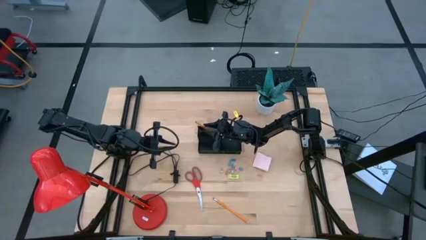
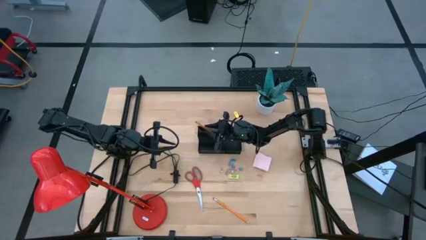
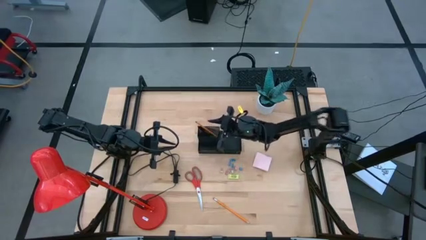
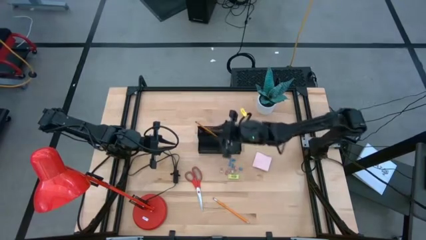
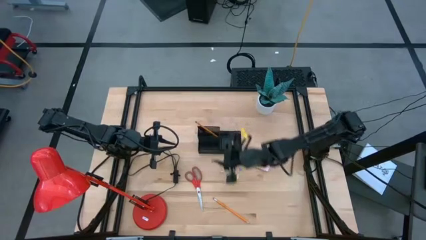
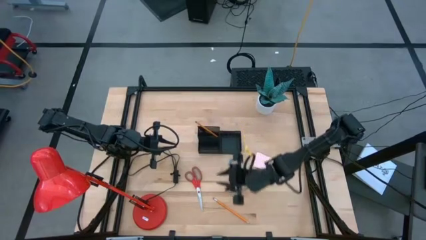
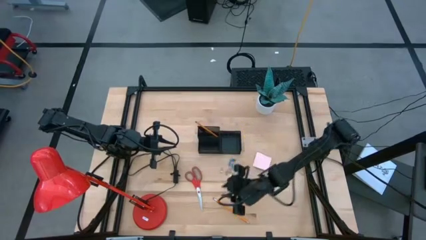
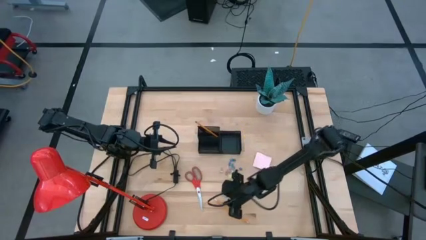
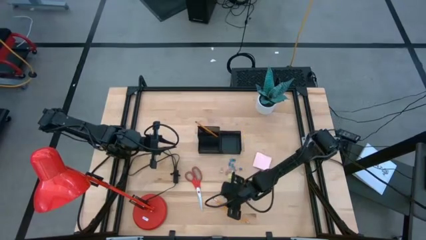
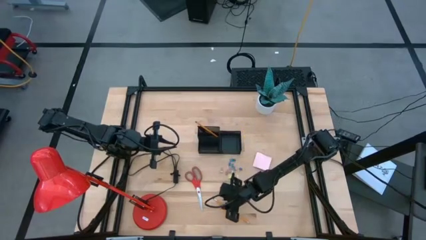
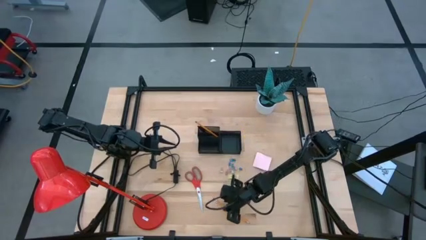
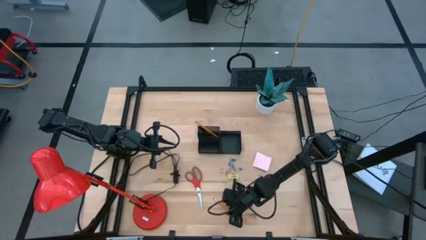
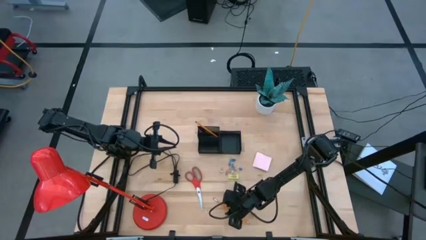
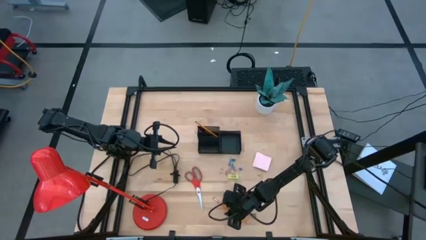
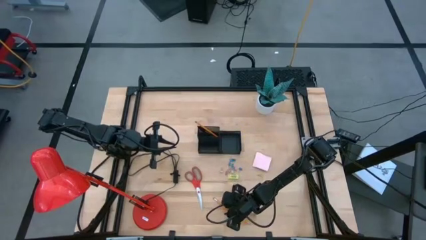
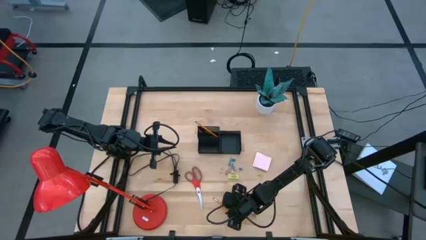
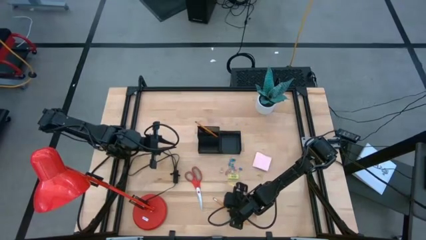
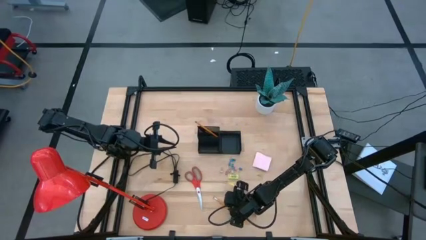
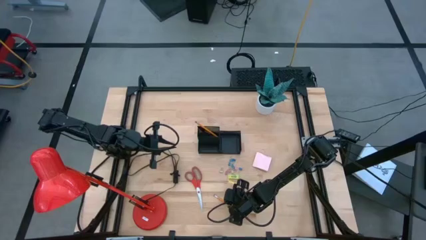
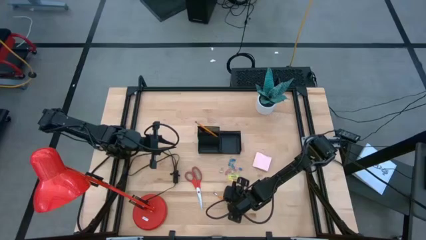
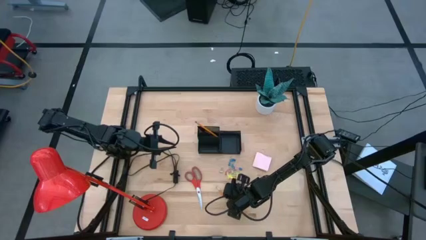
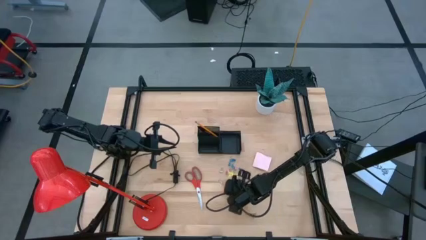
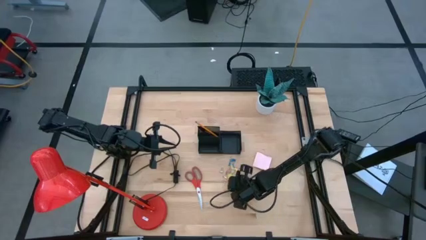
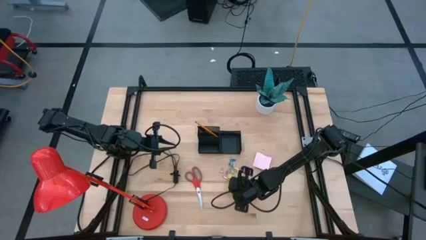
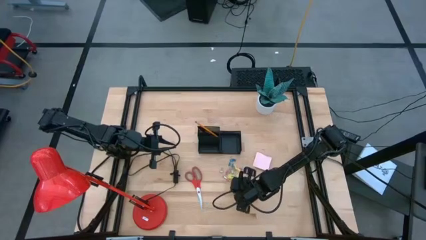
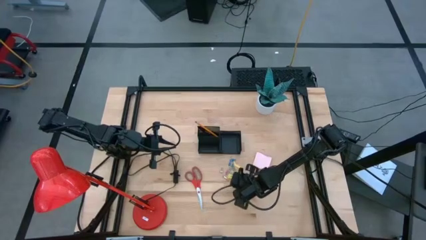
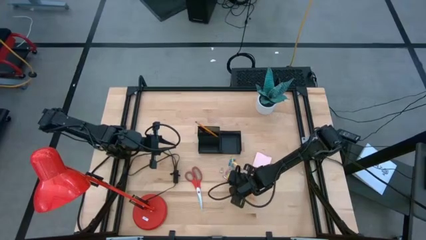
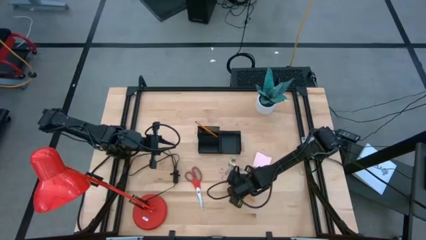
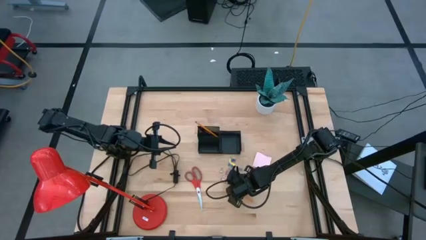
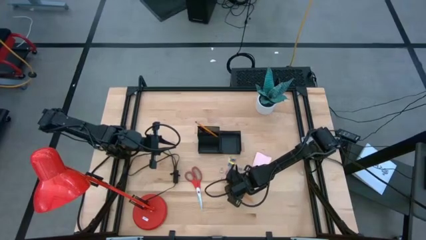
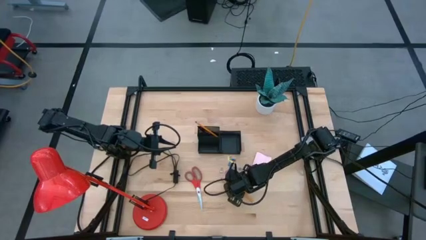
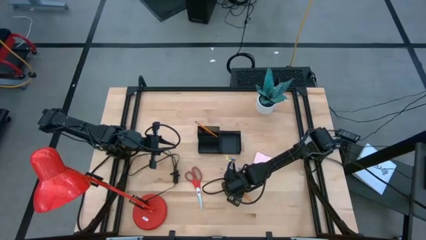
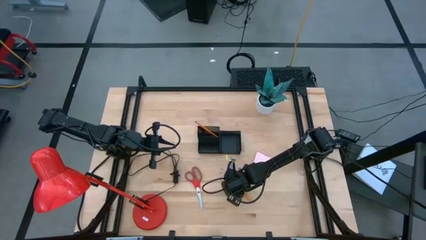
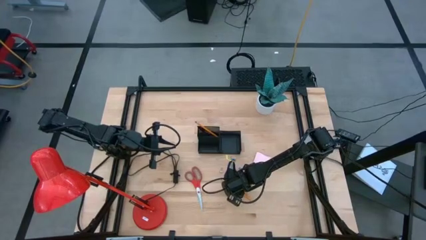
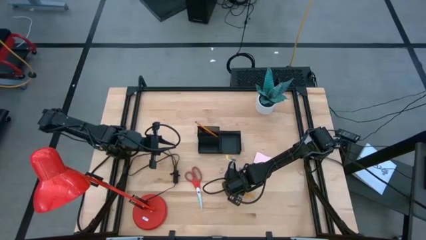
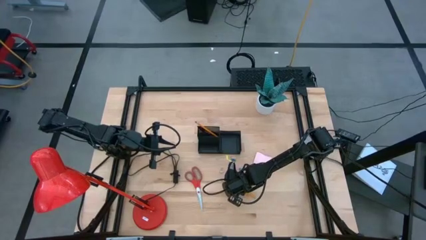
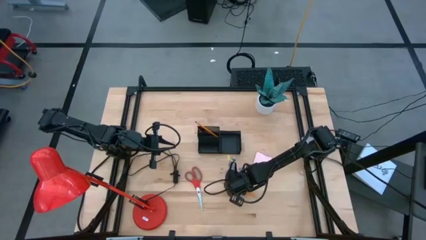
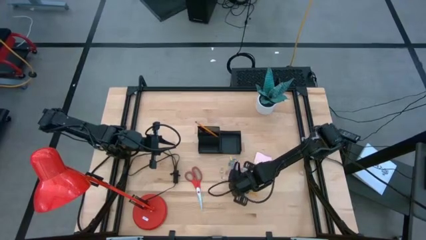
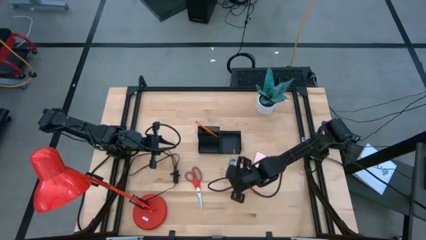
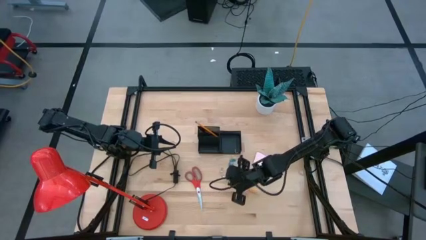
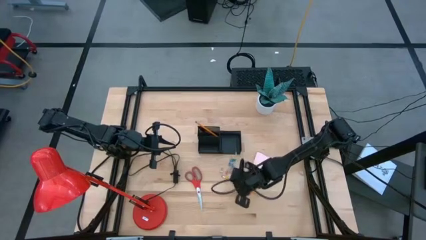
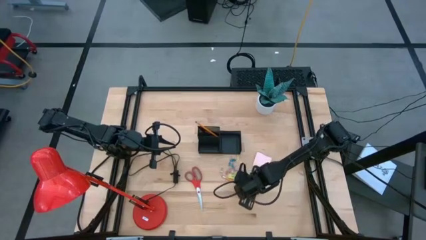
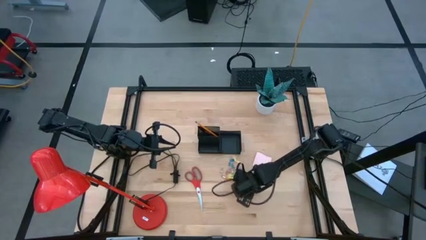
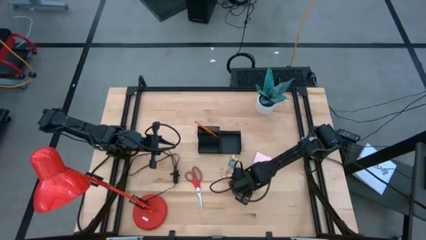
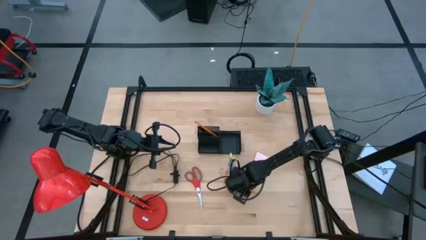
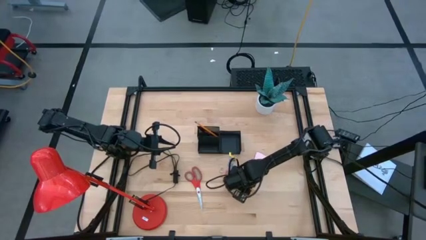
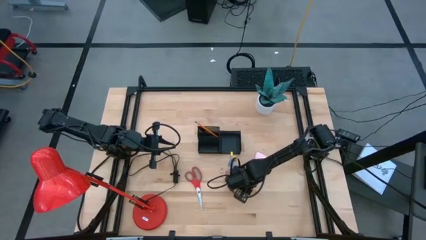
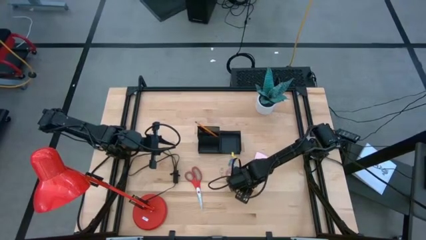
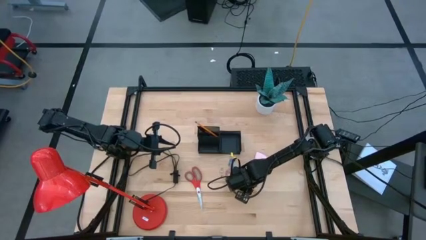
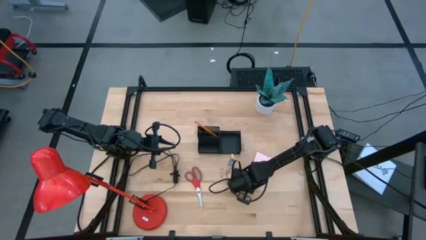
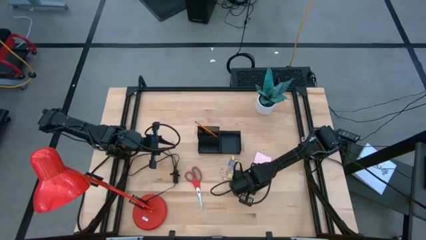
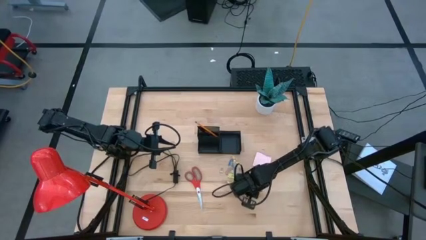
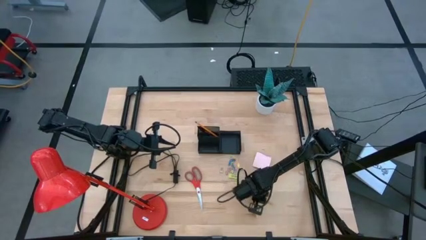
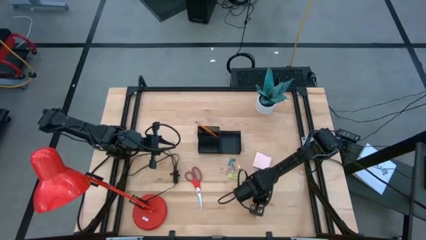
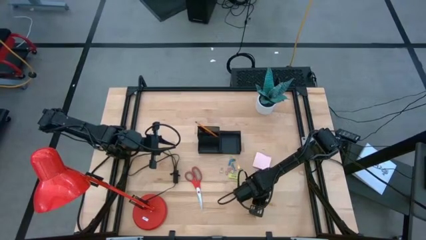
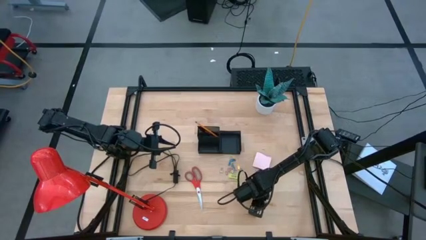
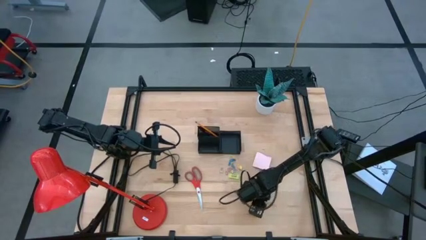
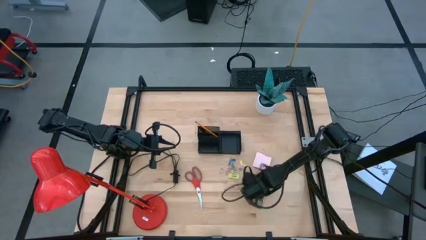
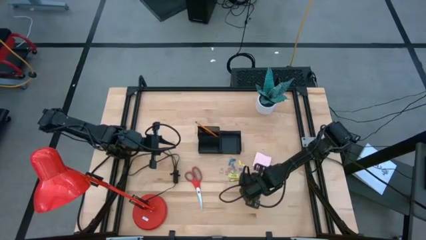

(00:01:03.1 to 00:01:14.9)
Task: Pick and place office supplies into organizer
Put the orange pencil into the black desk organizer

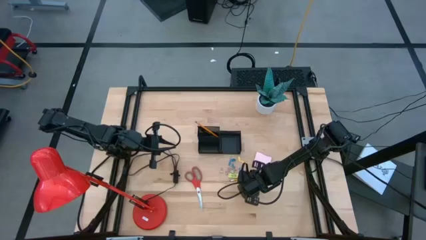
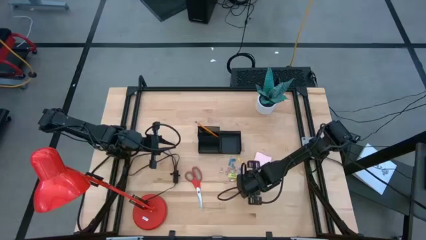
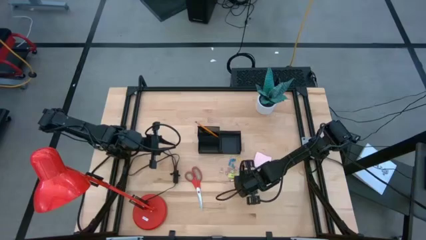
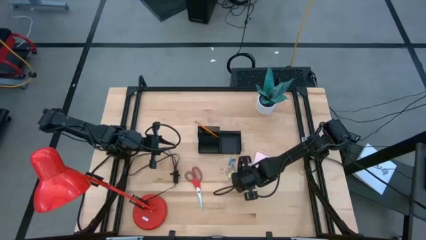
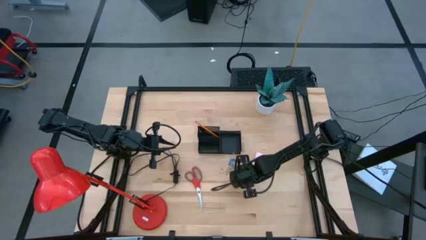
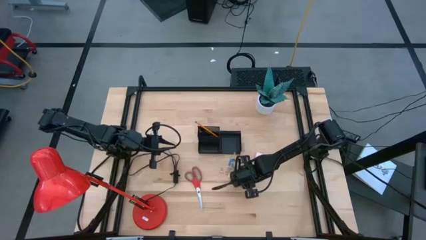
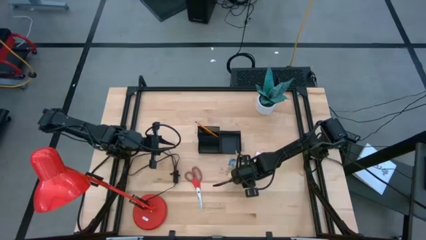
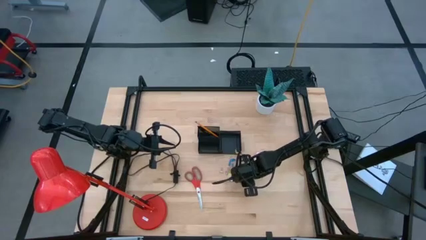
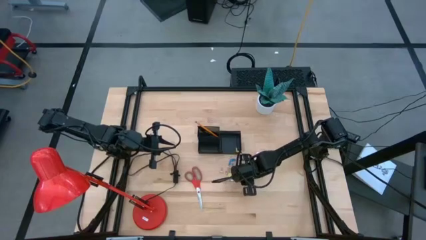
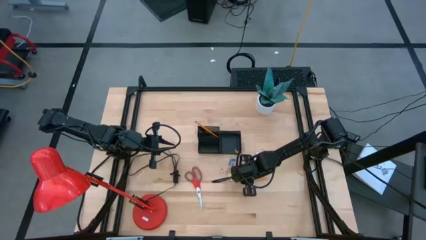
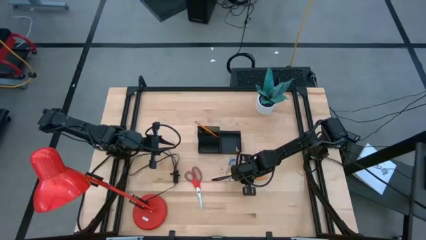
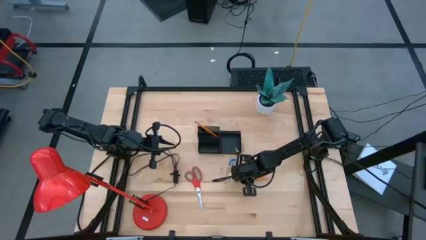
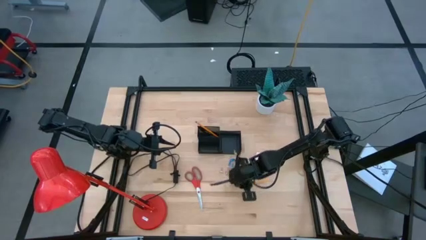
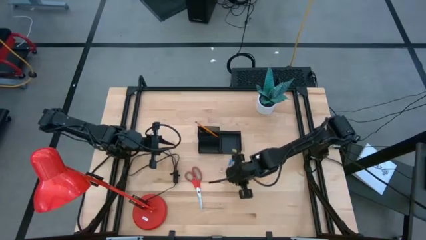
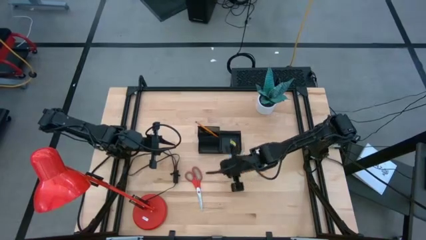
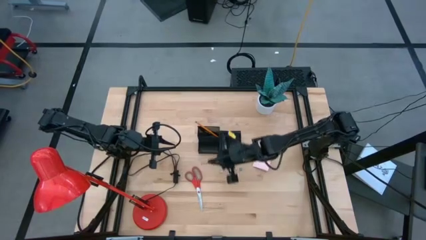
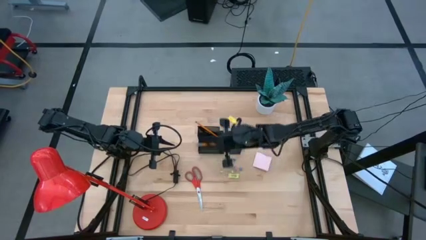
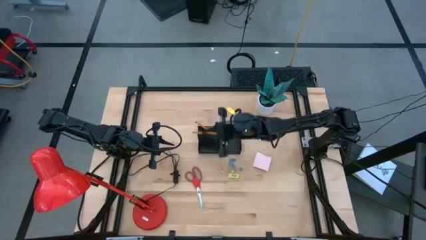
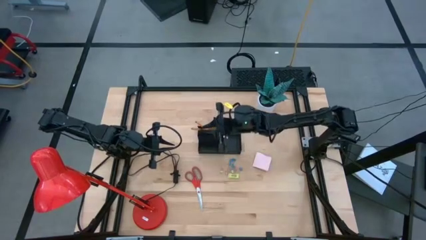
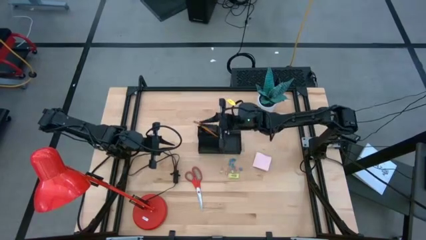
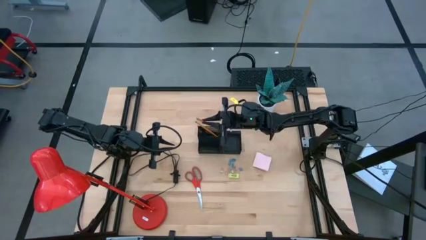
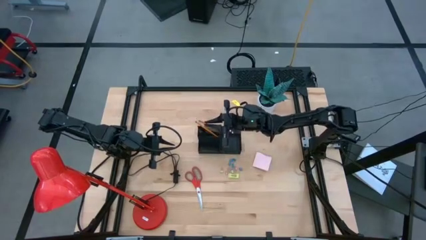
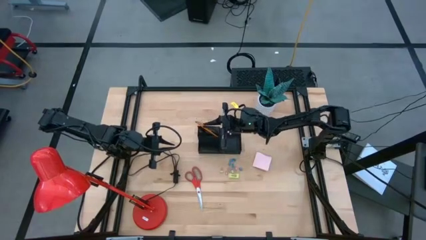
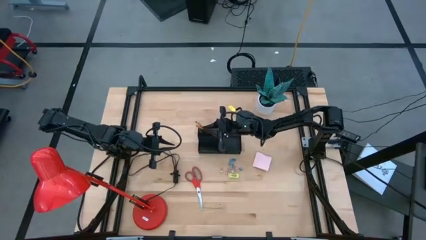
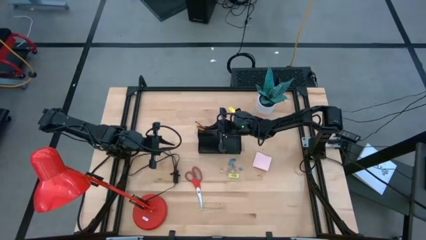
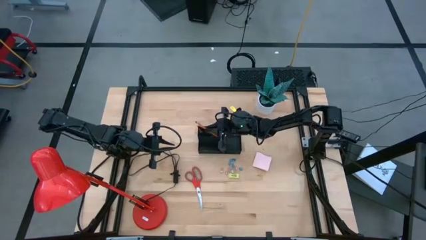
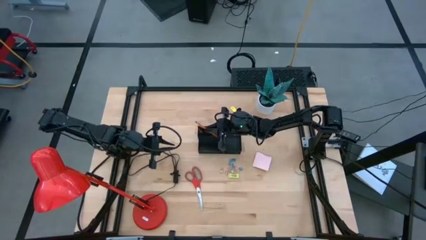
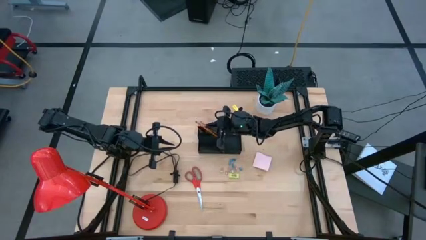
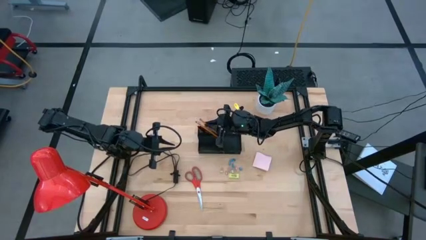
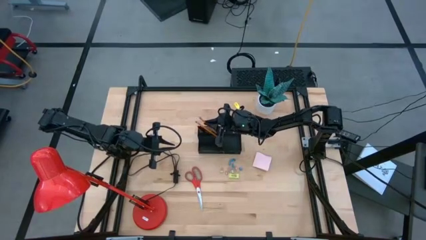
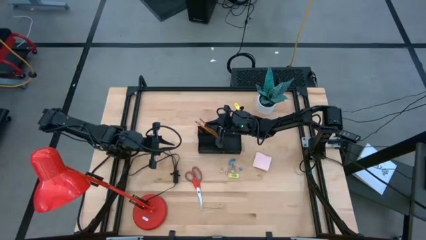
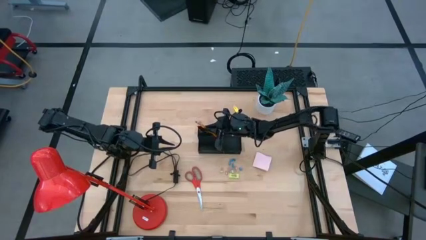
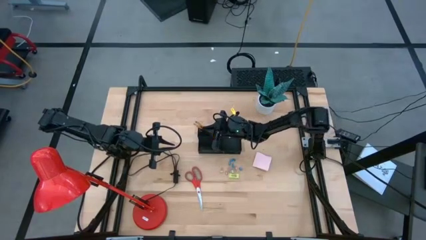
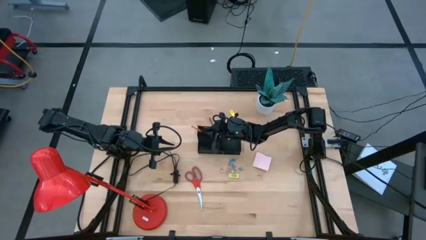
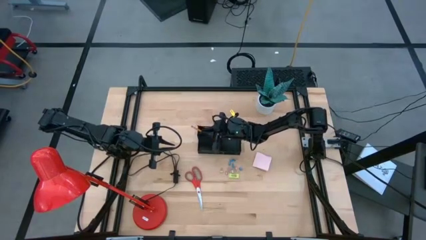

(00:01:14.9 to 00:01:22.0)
Put the orange pencil into the black desk organizer
